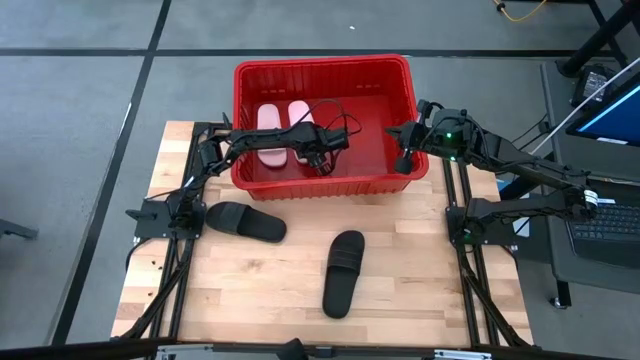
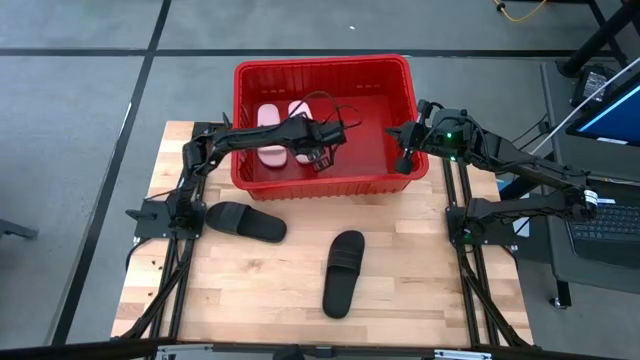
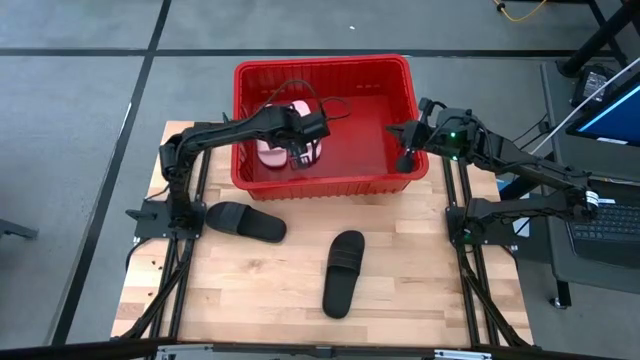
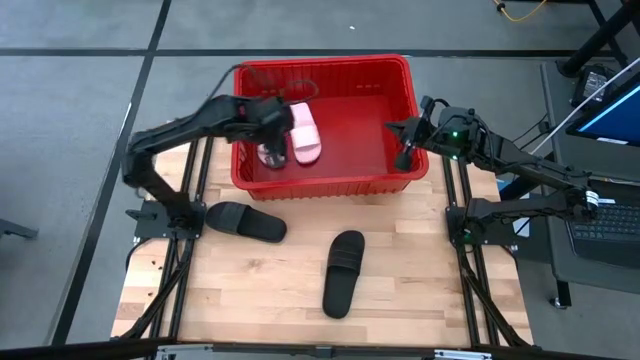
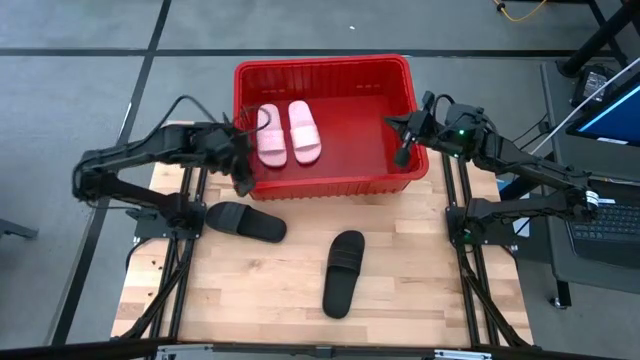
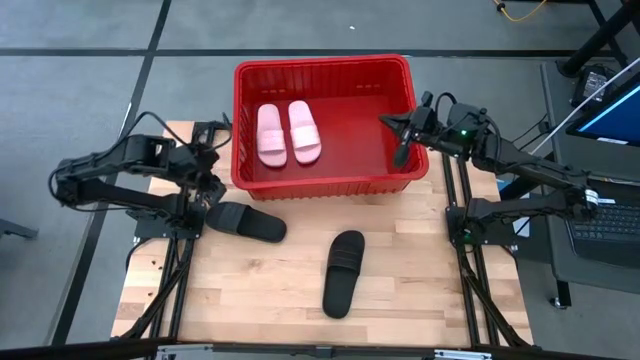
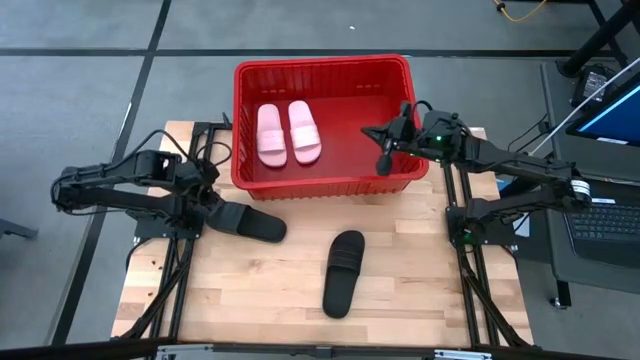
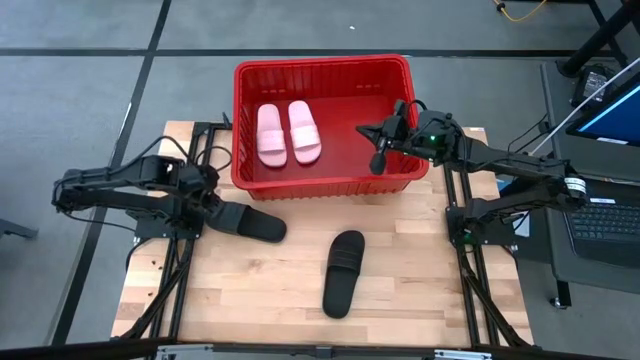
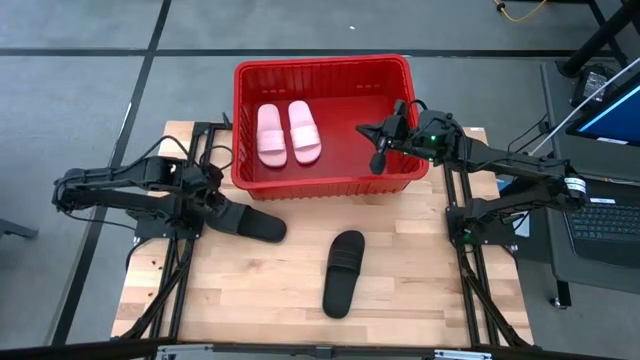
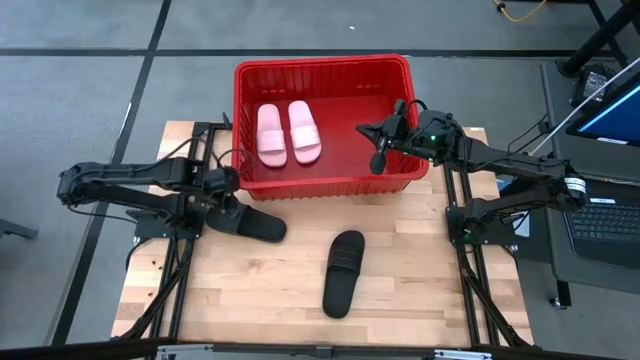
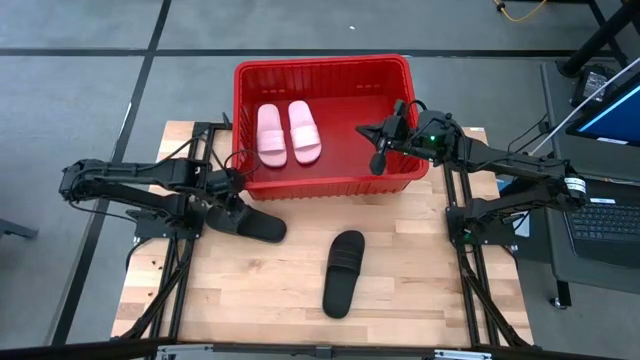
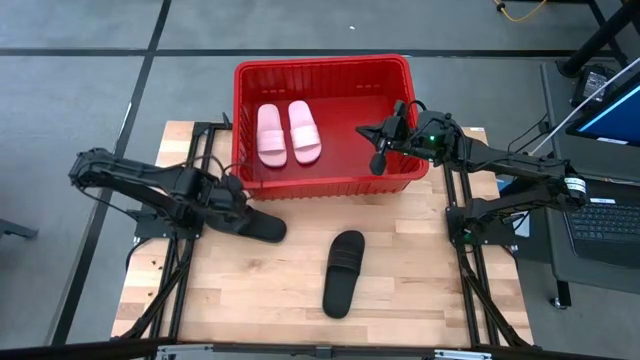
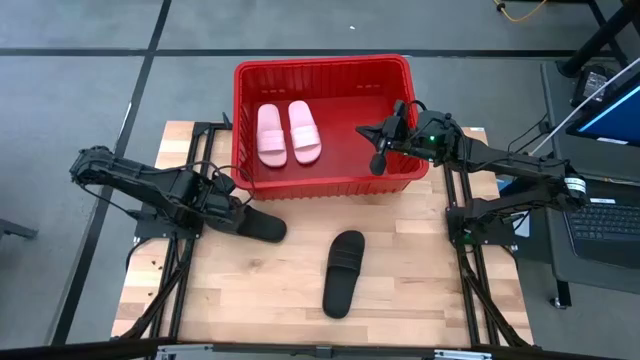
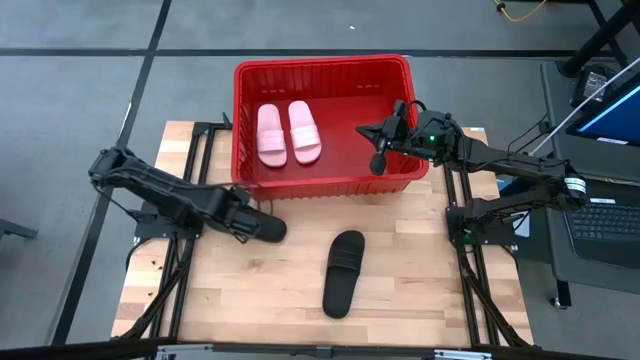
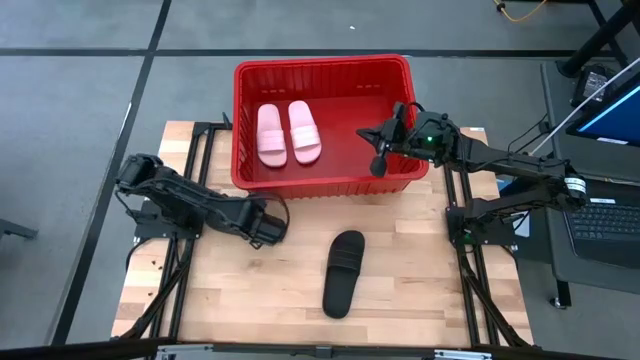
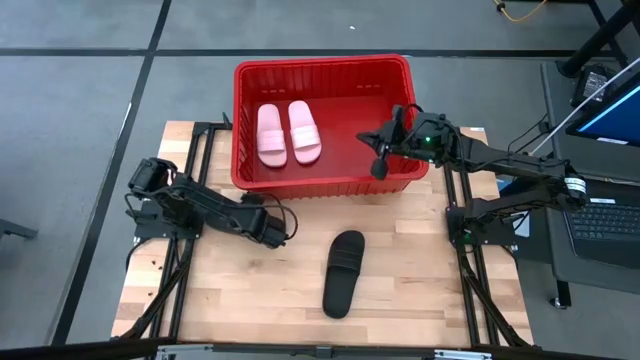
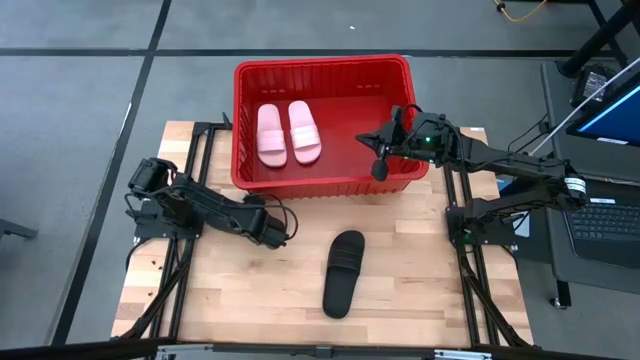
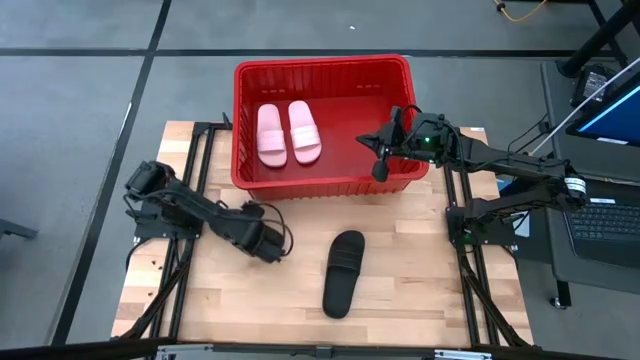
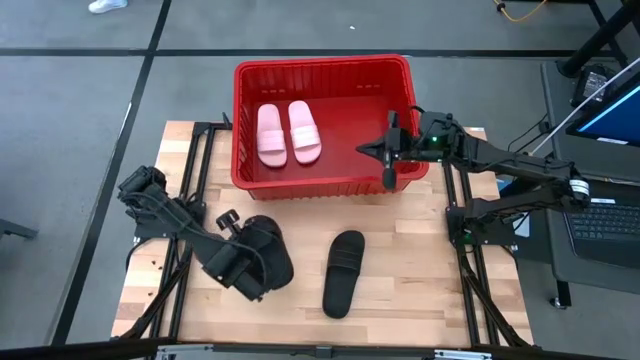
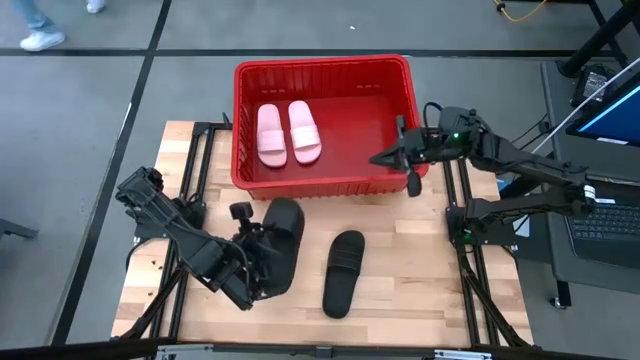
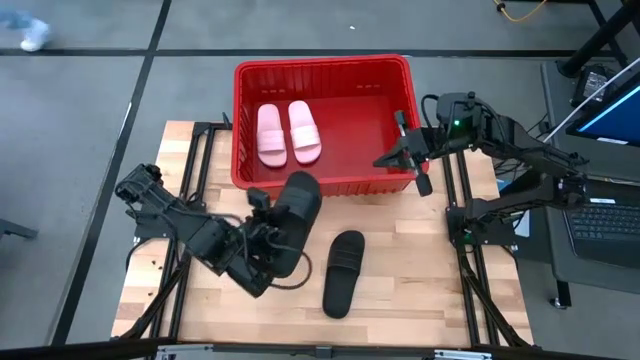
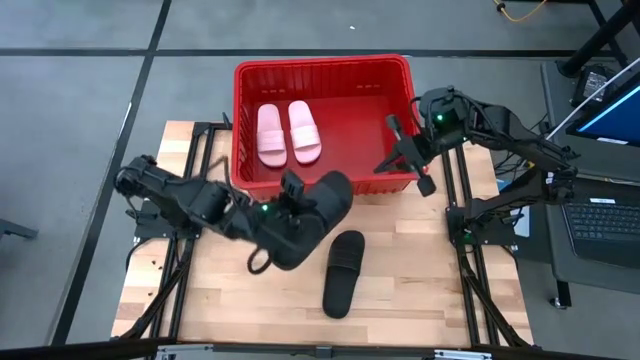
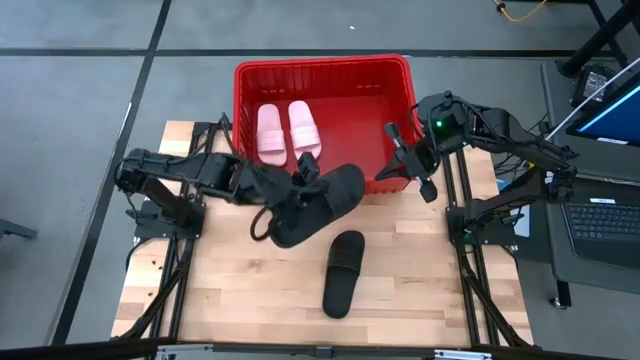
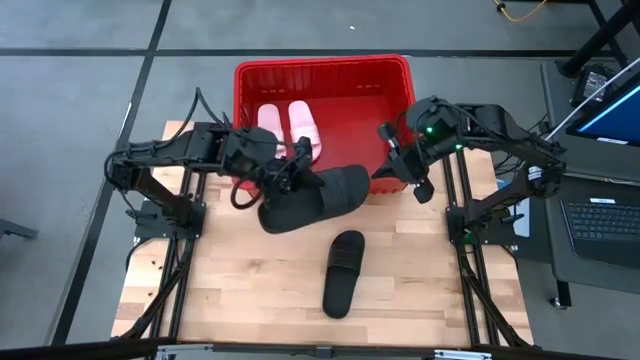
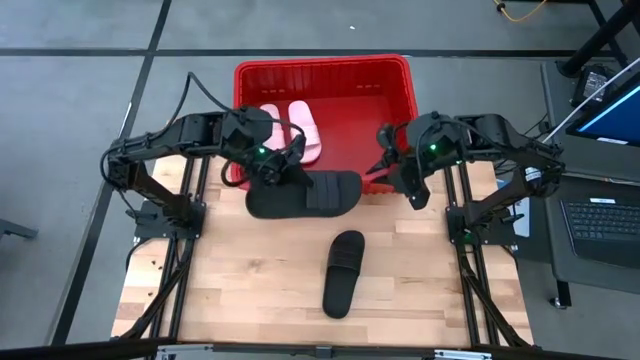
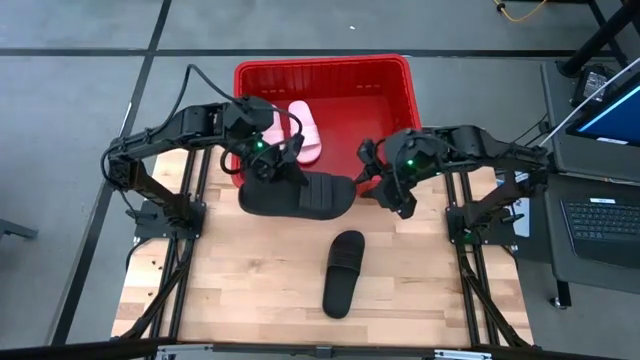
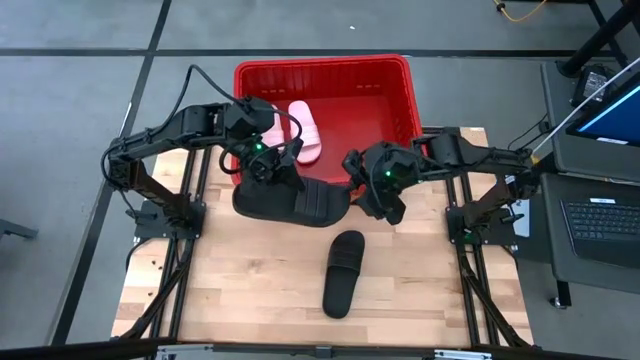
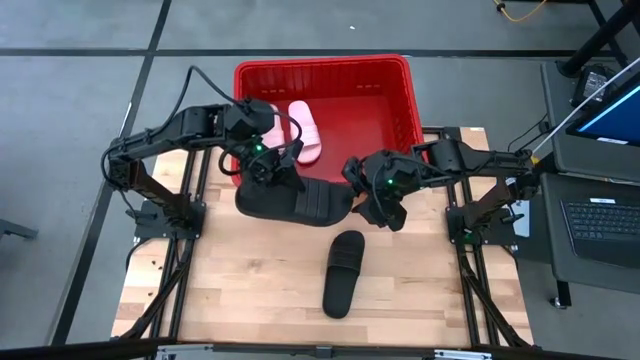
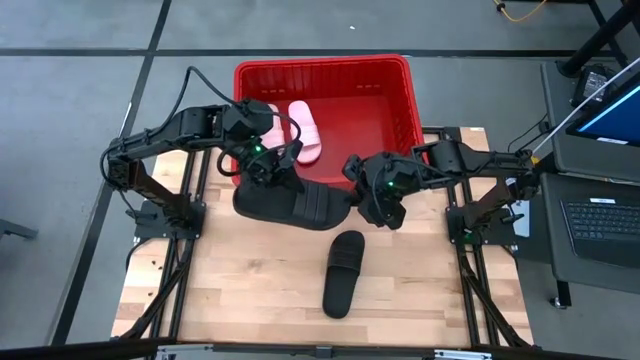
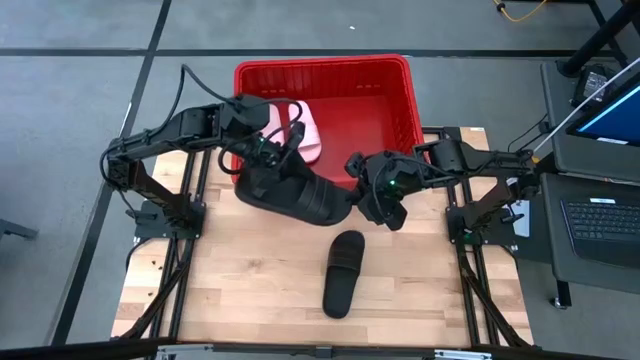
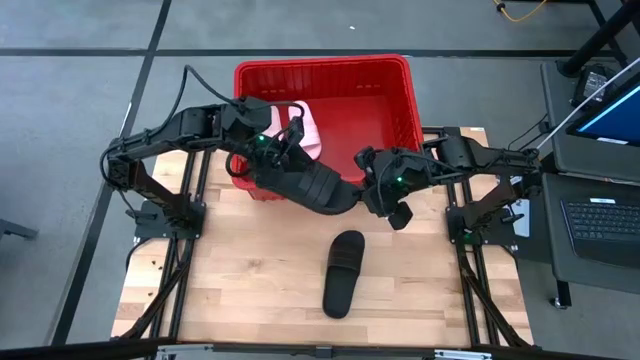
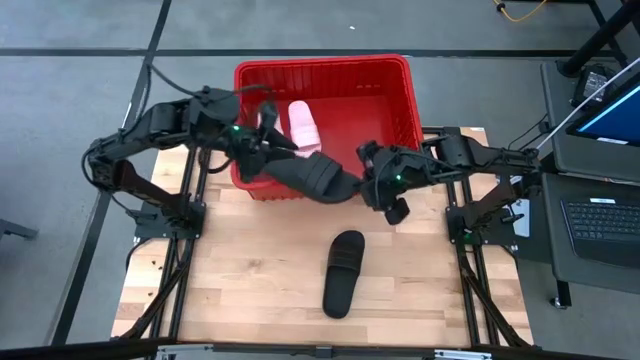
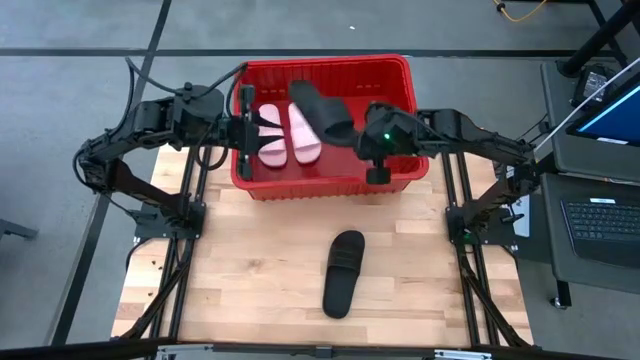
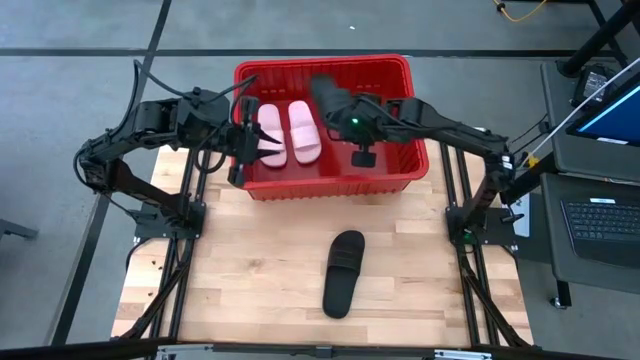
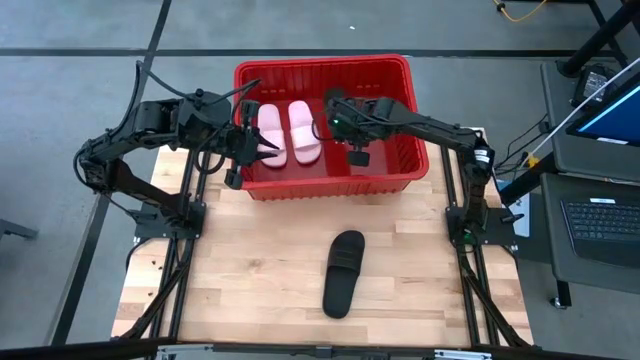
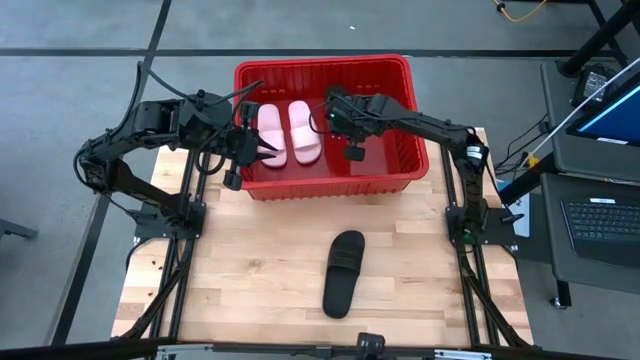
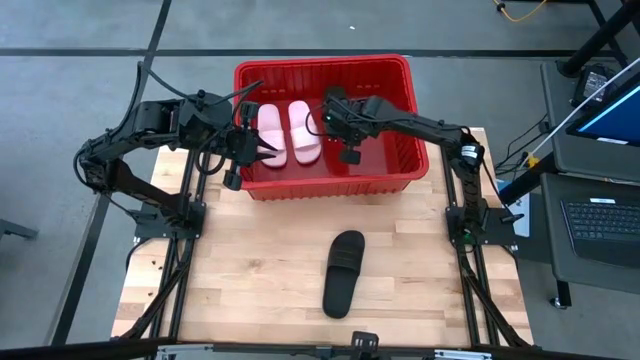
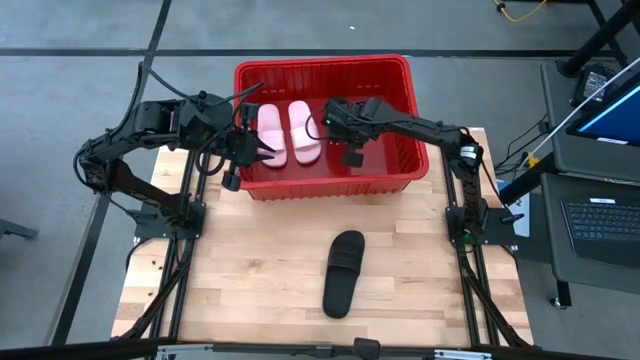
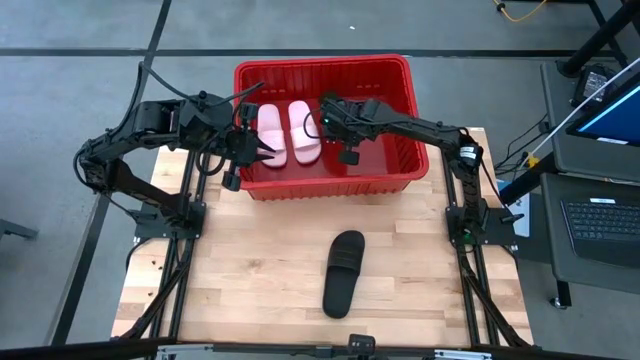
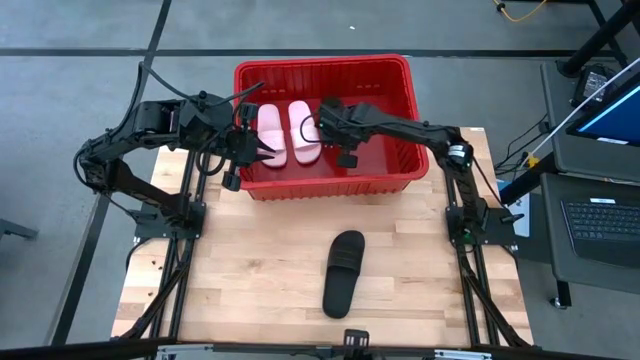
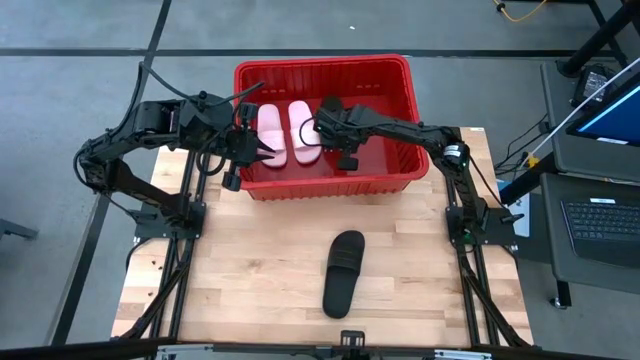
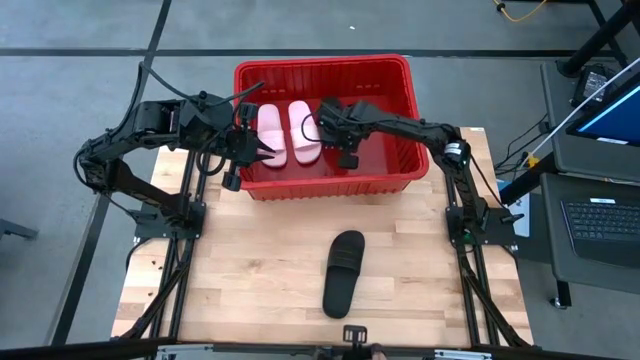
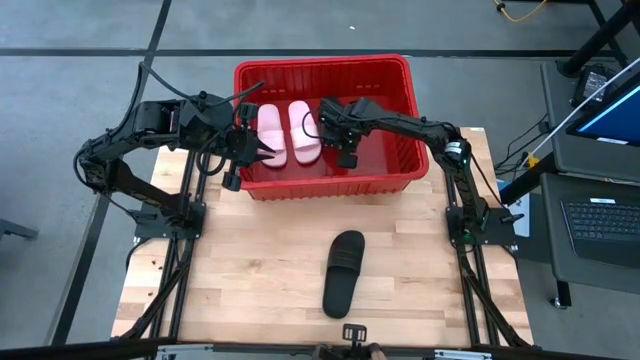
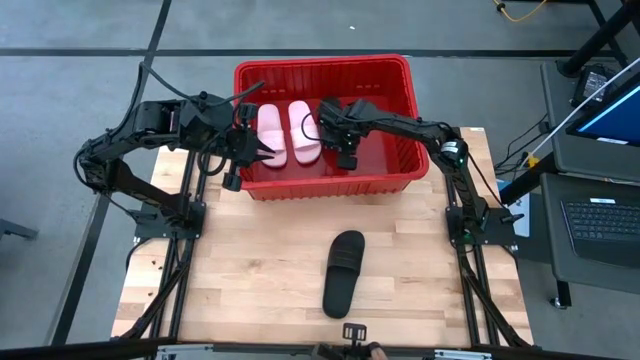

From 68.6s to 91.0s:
Task: Pick and place slides into bin
Put the top black slide into the red bin
